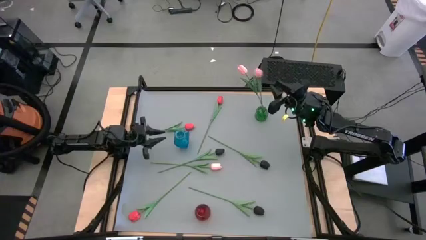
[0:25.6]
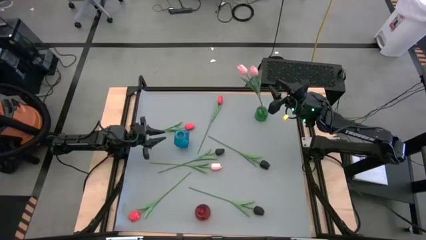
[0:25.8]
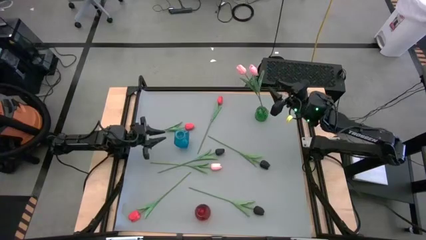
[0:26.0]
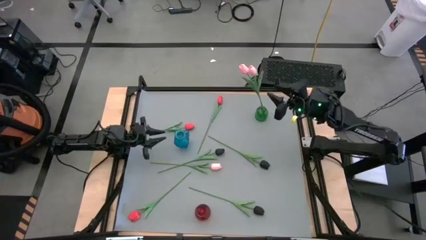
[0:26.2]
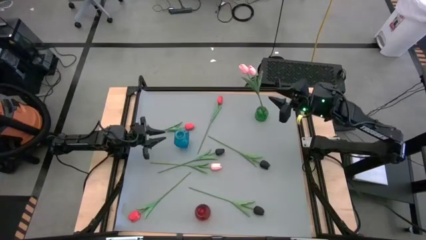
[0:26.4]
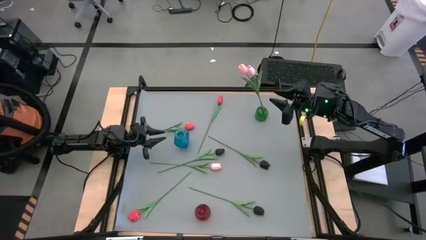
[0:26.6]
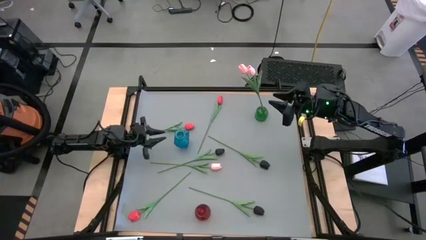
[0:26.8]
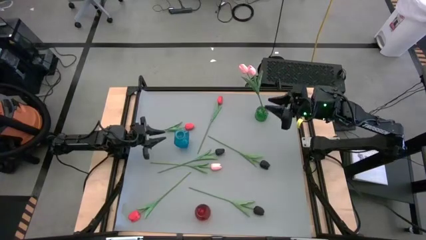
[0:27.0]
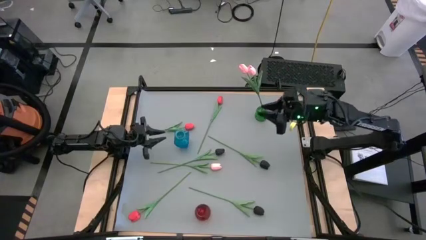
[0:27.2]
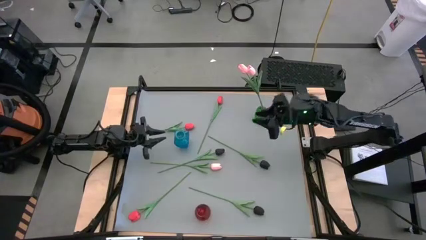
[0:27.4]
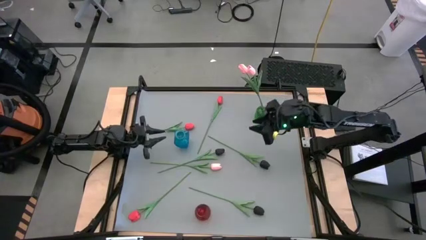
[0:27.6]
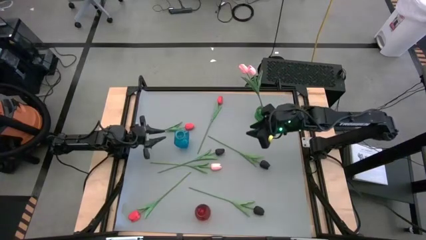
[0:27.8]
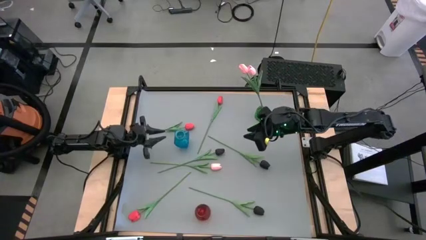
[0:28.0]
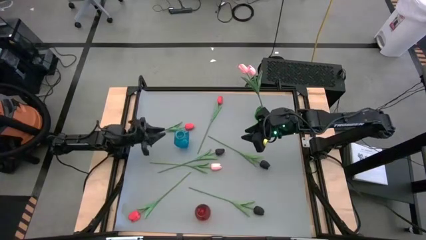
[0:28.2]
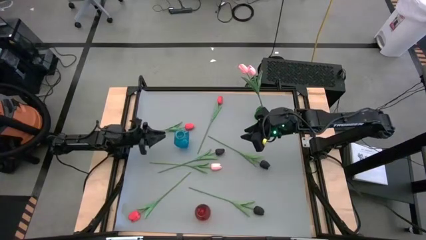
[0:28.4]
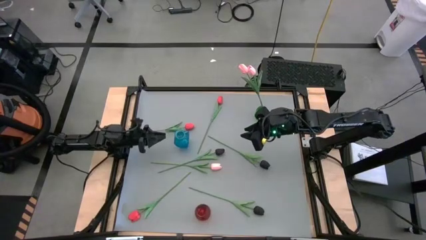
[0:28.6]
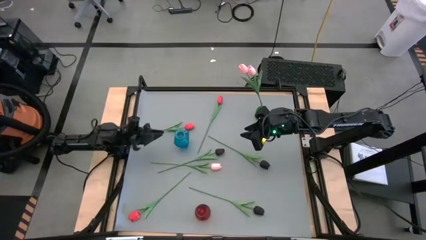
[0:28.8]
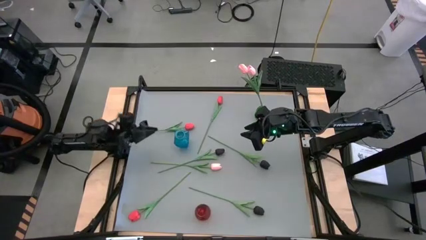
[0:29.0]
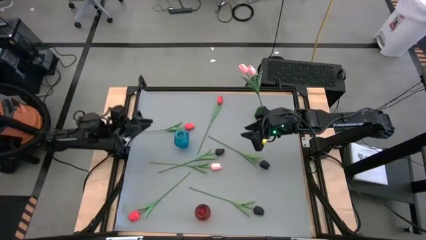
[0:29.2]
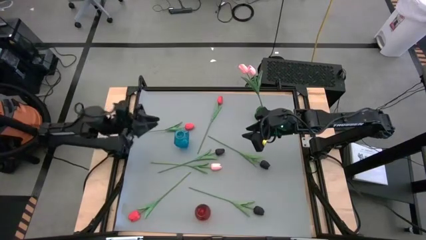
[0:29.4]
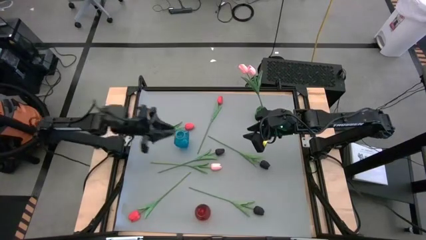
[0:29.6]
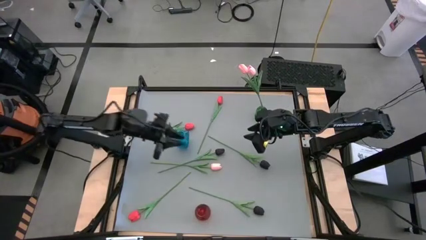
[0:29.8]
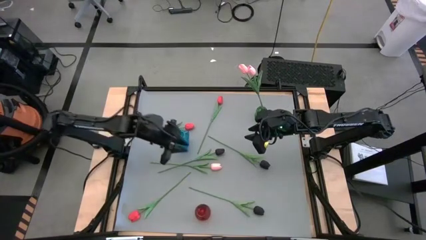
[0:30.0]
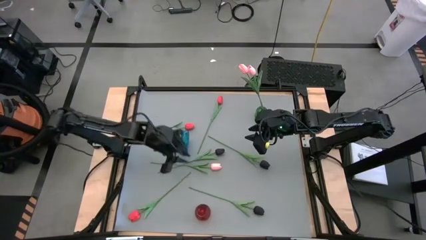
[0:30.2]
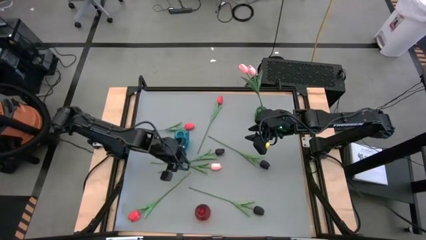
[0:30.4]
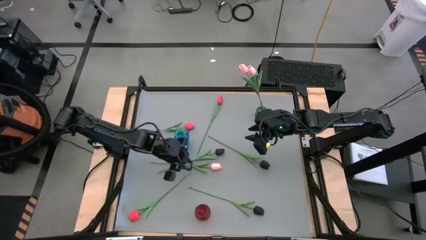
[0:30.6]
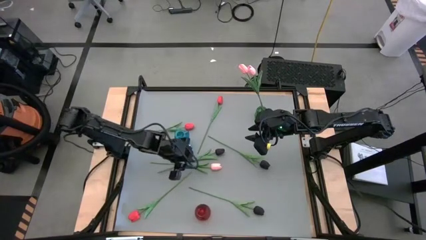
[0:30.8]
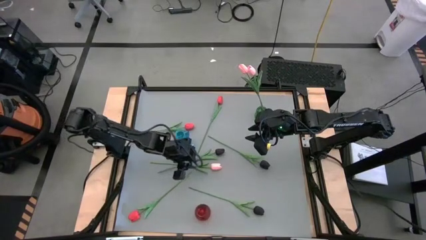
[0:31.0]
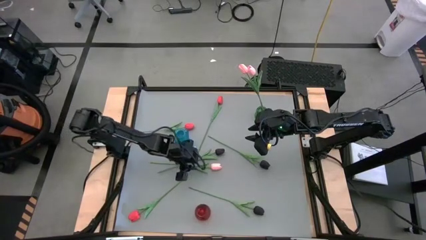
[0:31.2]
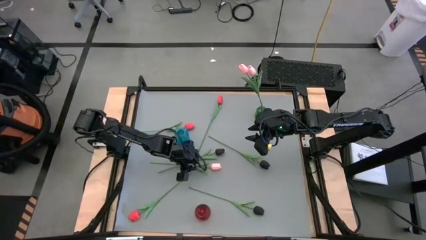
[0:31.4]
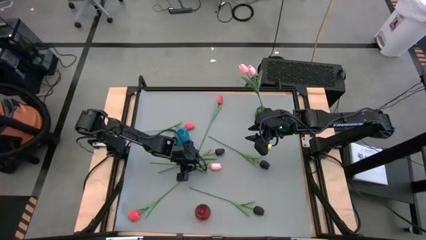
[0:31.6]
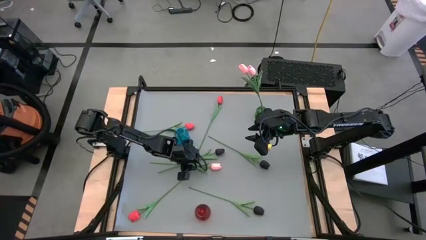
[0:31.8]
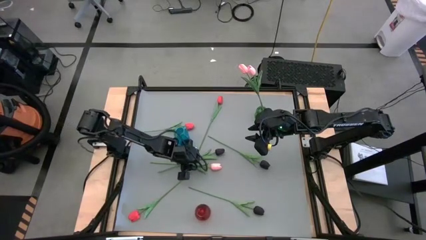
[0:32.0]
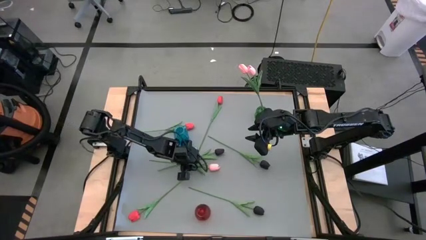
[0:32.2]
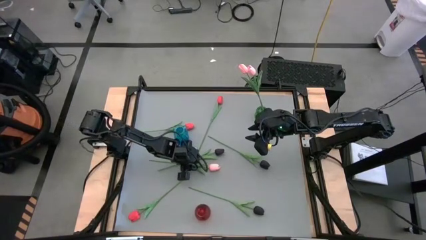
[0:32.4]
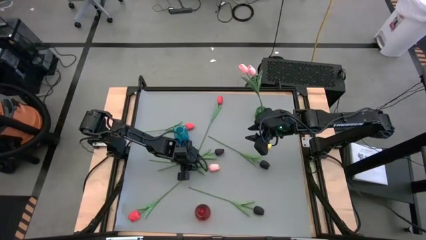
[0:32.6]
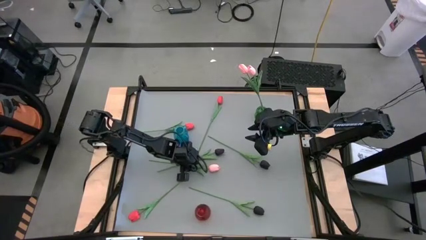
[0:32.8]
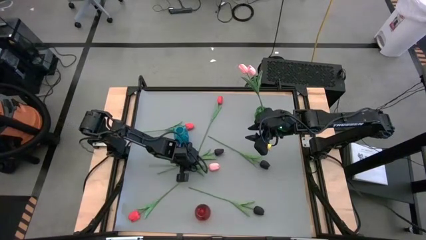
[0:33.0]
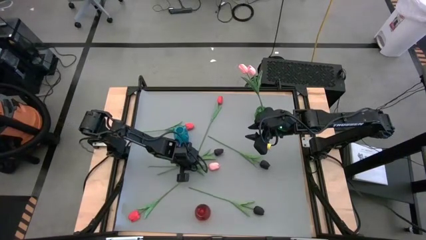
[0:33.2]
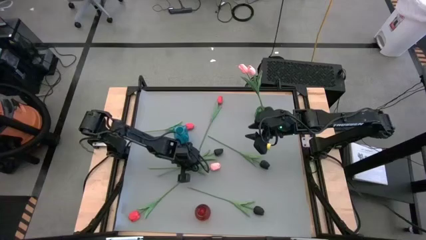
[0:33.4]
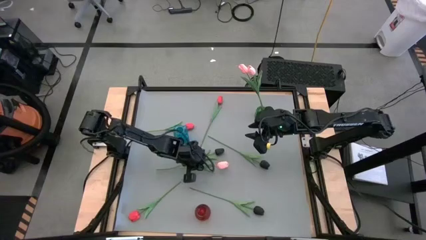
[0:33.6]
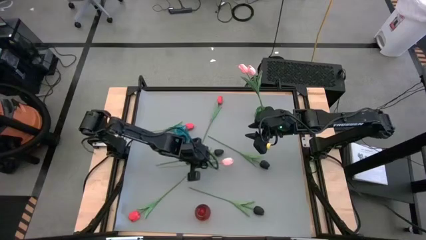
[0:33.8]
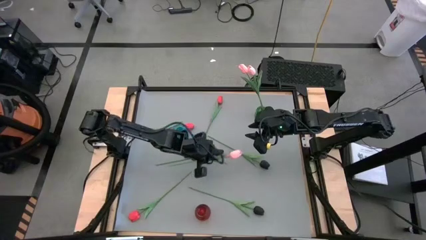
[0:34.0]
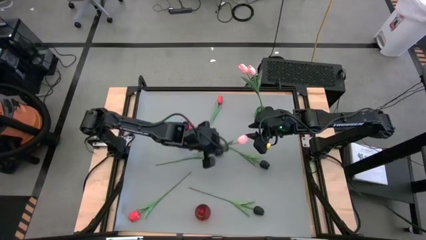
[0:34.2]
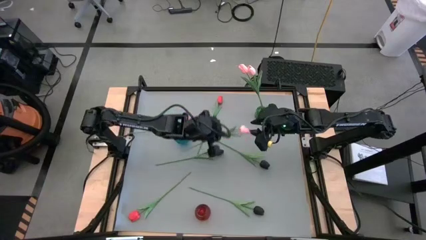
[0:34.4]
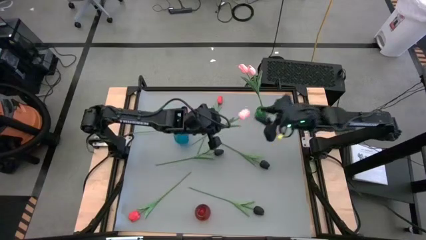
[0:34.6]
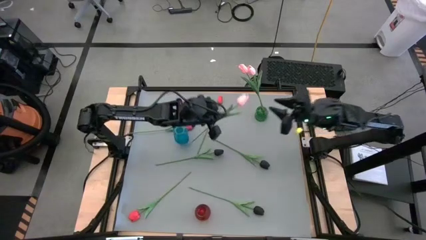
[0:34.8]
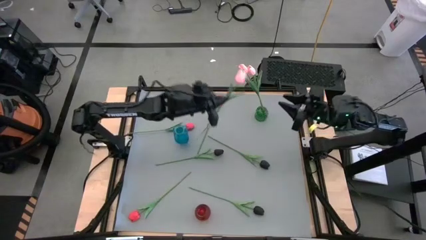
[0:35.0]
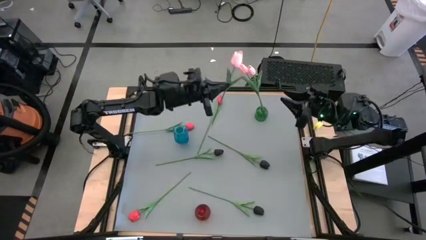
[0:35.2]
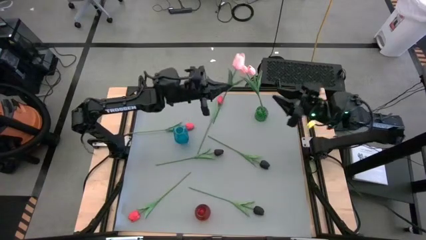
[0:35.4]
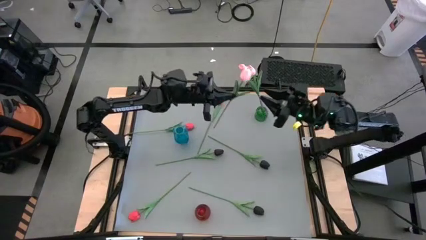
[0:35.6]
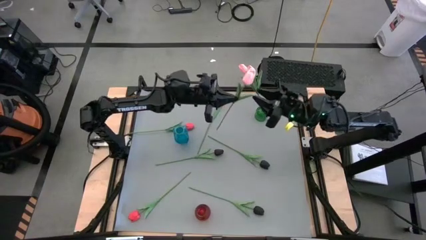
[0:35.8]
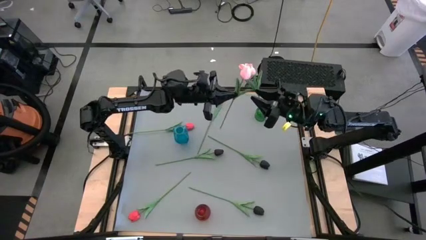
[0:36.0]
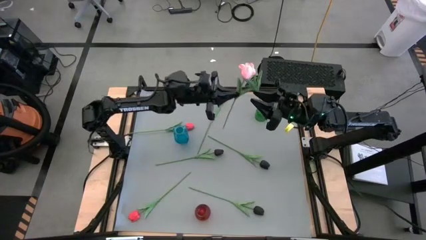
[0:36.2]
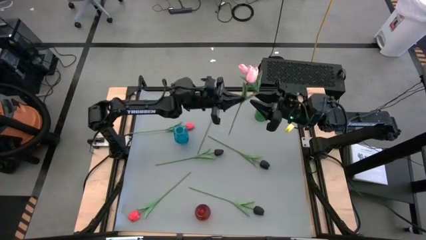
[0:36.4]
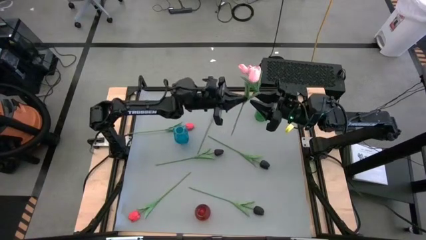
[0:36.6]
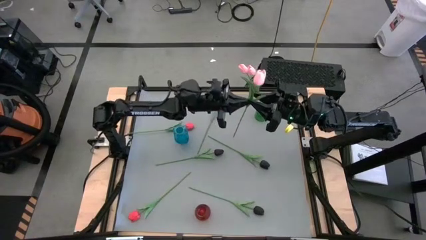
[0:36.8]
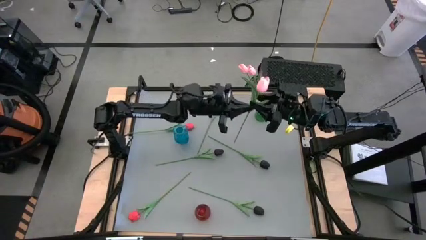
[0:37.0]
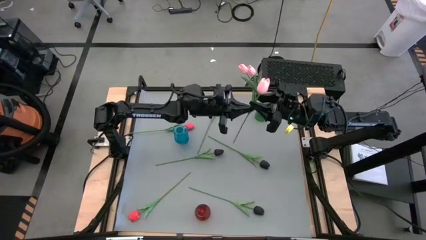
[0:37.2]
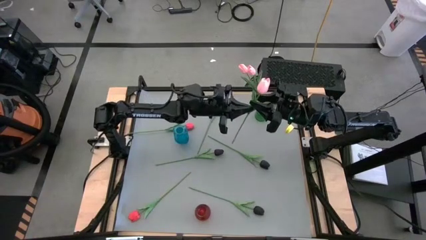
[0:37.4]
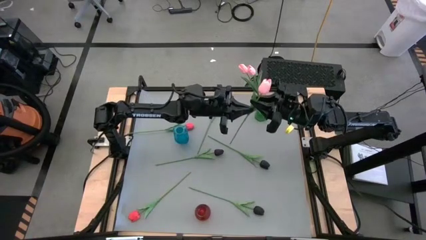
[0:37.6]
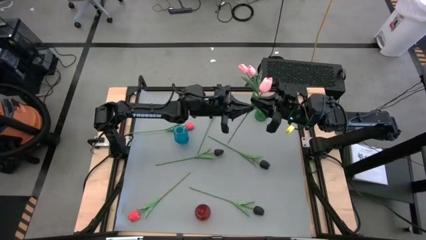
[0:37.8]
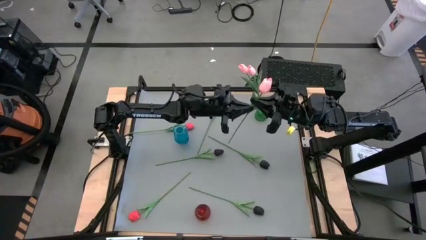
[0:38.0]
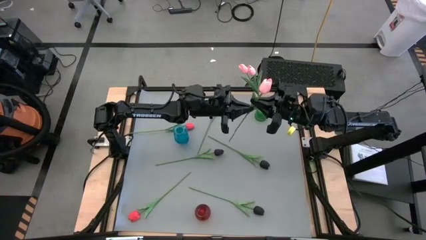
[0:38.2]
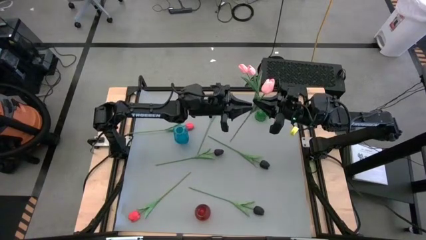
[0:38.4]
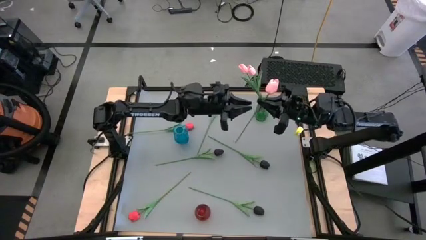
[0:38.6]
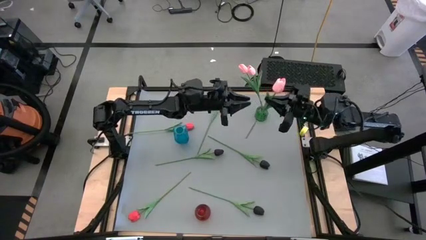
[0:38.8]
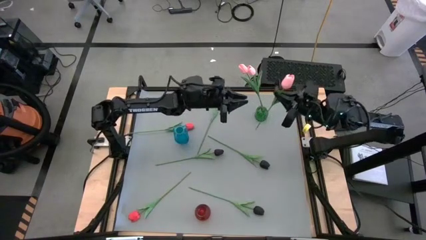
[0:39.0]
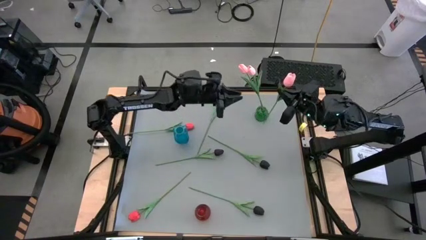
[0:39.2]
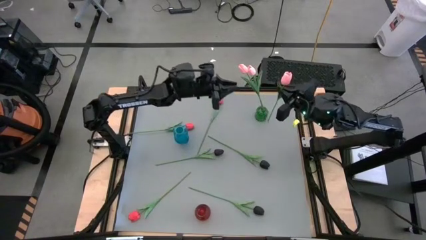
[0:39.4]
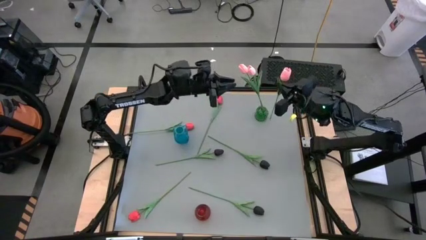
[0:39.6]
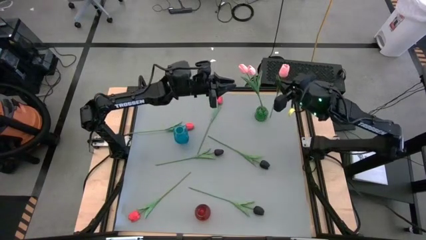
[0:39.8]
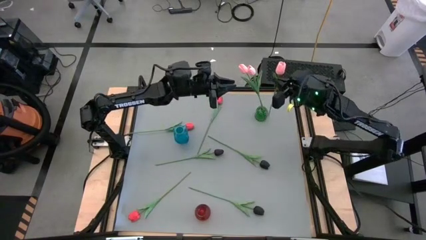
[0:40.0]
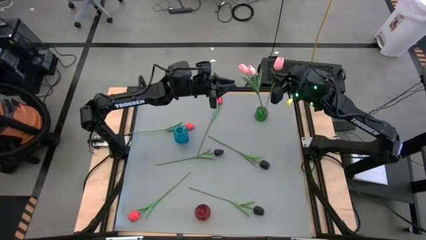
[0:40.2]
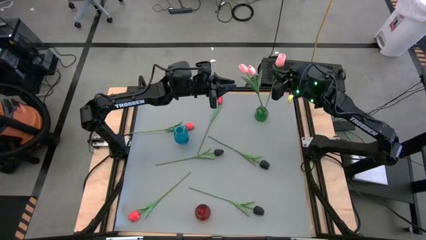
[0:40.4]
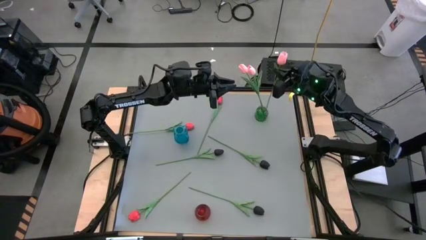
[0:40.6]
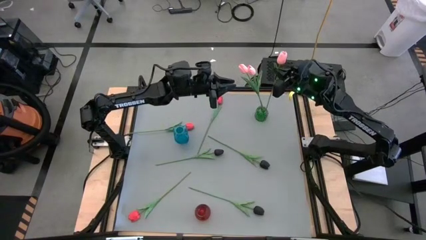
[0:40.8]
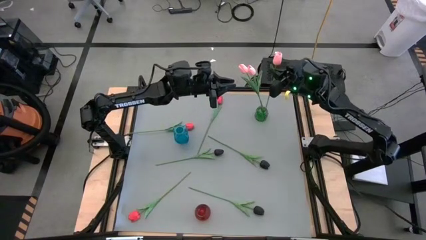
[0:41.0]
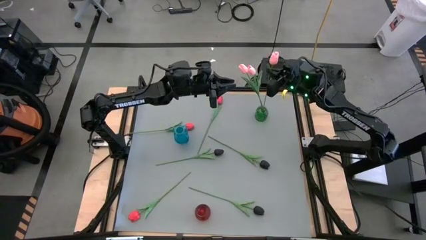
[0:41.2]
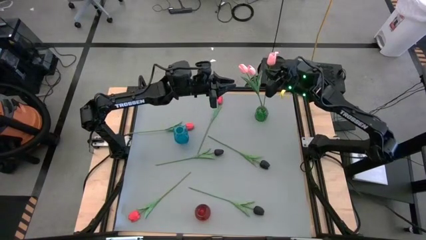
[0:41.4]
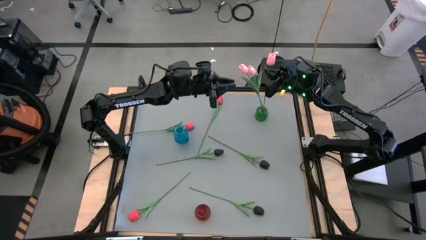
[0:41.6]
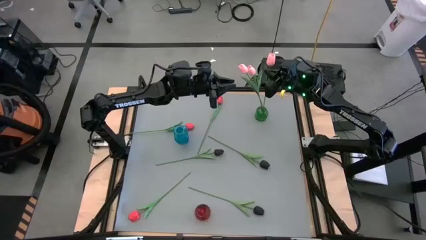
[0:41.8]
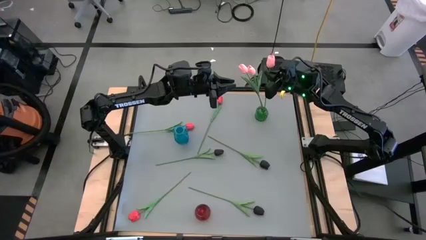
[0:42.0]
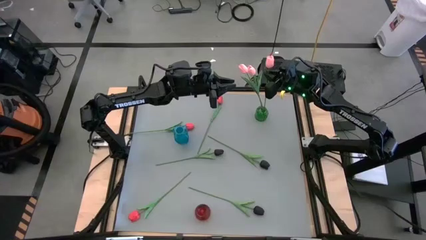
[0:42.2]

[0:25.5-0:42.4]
Task: Sort flowers into vase by color
Put the pink flower into the green vase
